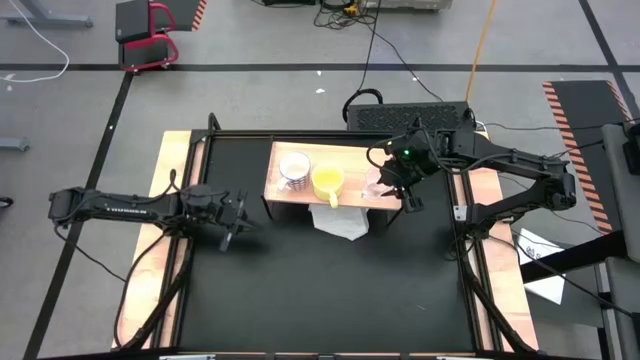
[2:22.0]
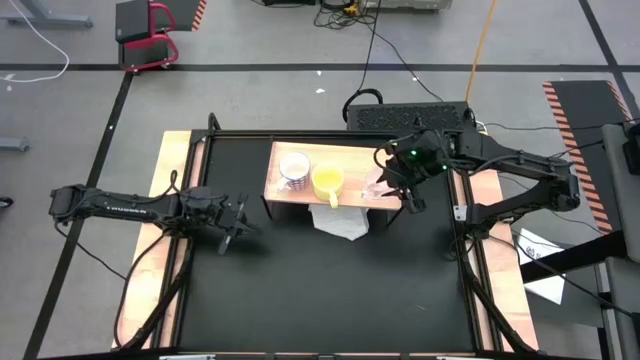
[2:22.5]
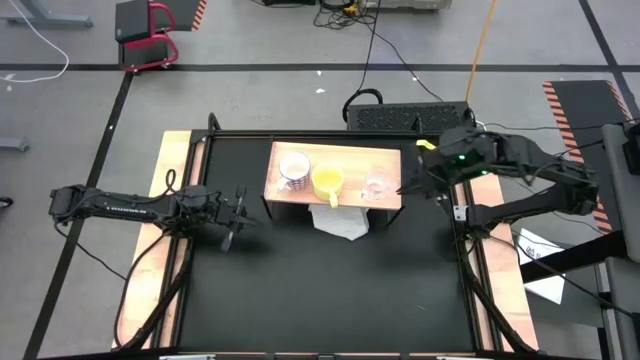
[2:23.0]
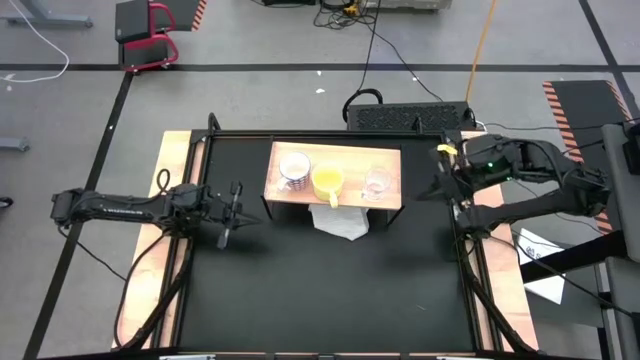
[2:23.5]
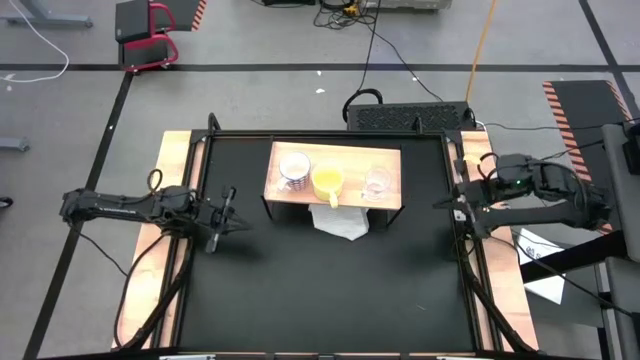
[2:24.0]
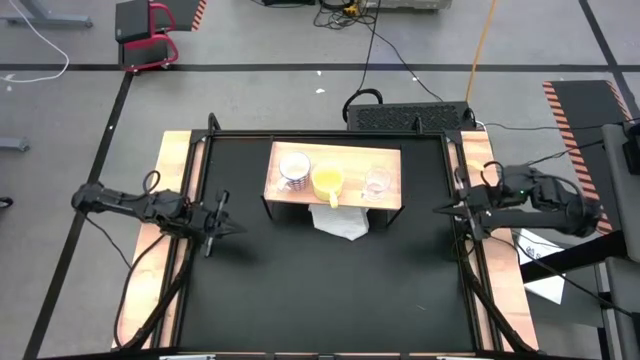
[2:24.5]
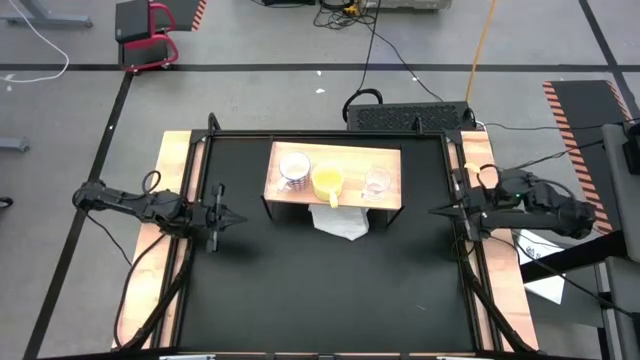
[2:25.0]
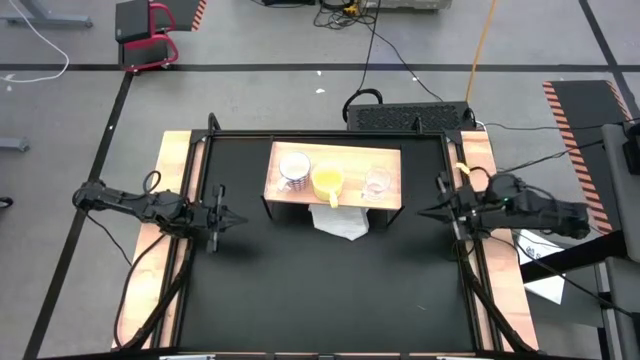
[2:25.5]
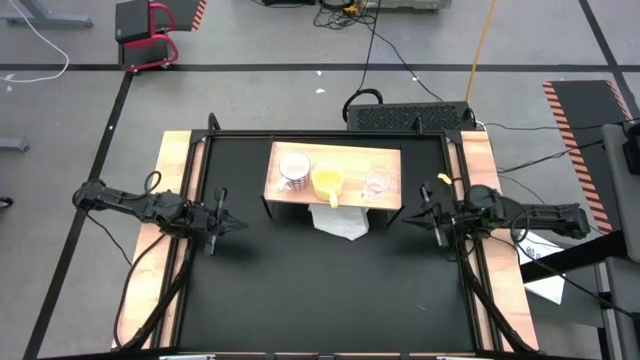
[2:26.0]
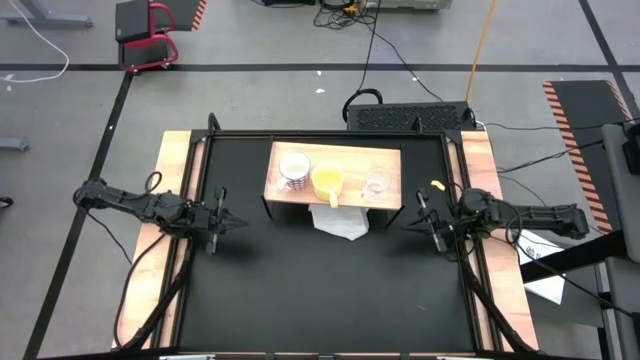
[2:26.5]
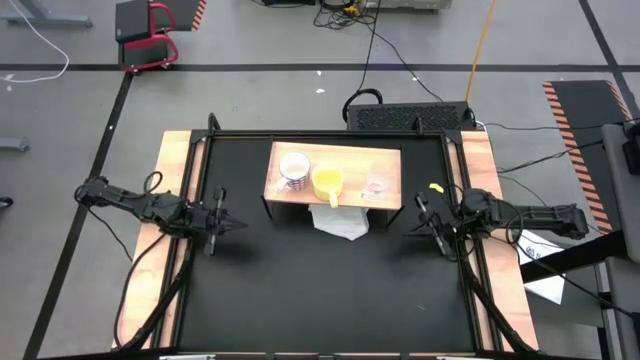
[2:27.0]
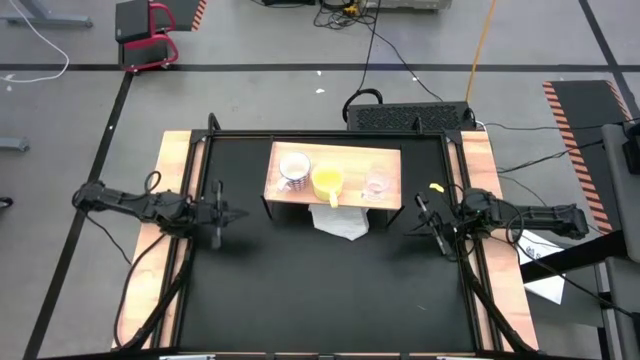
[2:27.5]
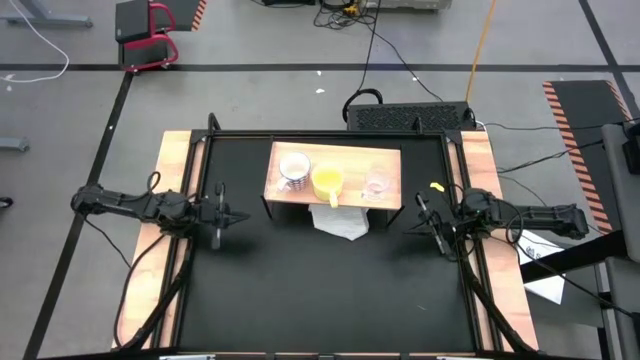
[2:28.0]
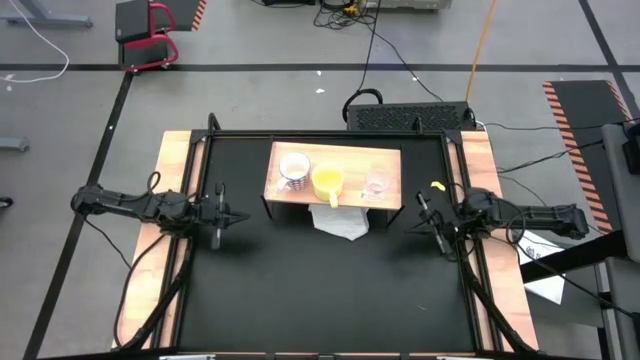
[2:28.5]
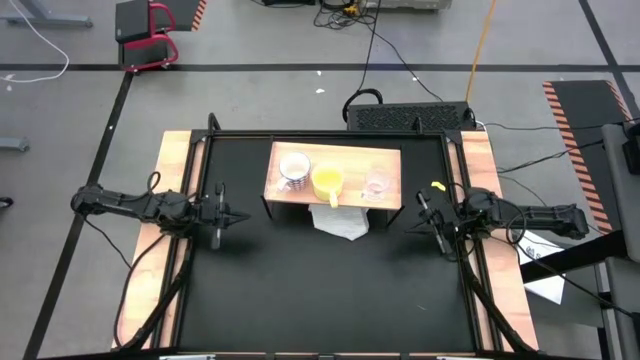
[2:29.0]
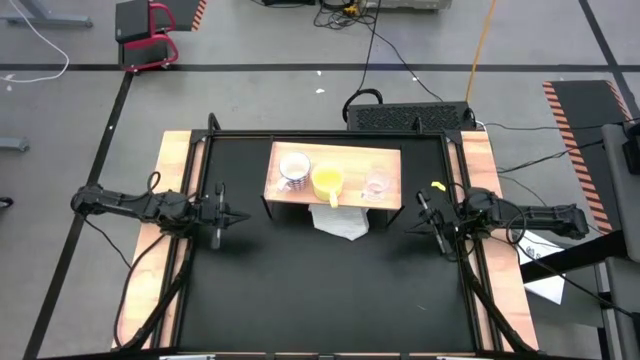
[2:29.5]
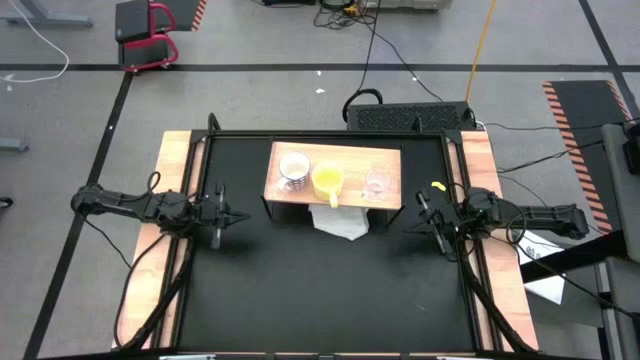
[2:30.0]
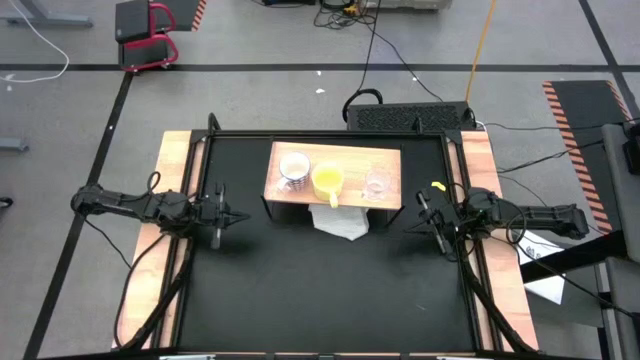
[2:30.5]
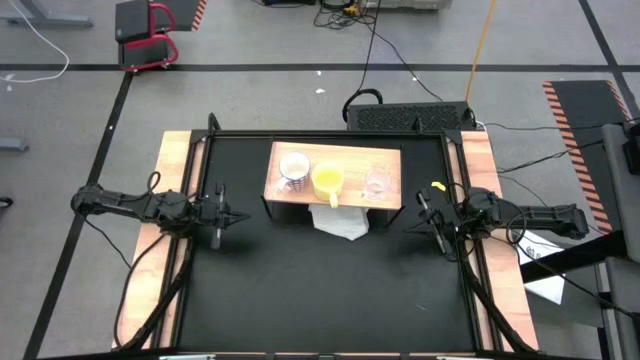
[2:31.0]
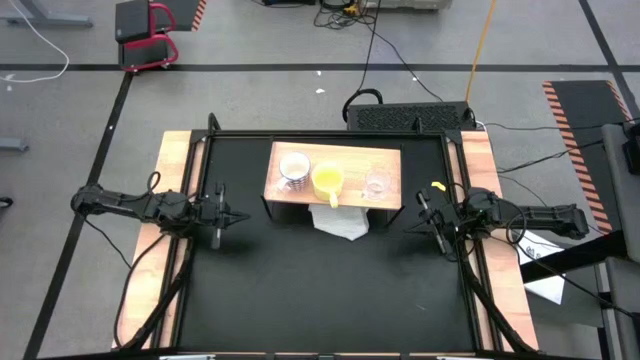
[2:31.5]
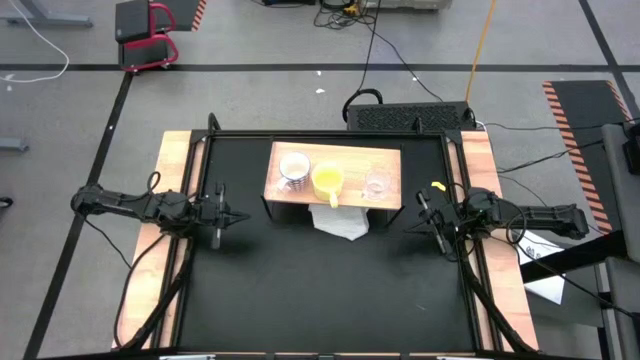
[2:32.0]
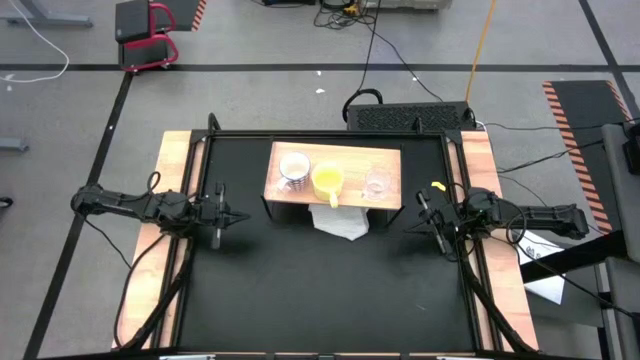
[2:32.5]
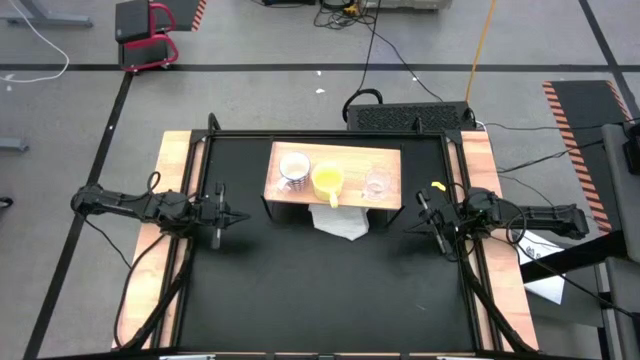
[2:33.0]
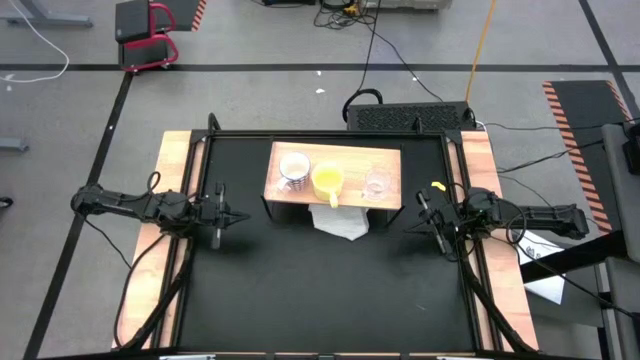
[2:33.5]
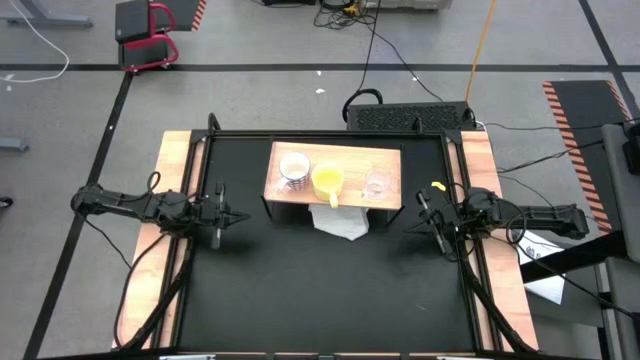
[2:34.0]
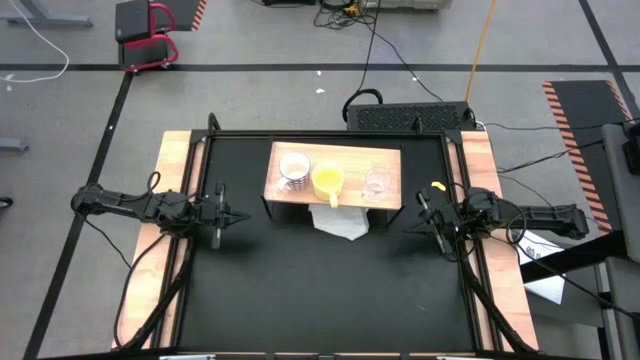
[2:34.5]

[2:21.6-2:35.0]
Task: Stack small to large cups/mugs on shelf
Return to Home Position

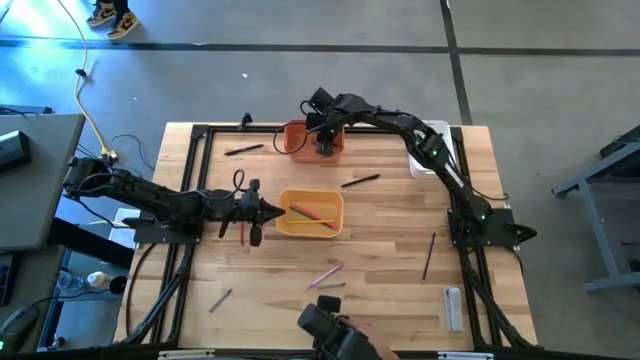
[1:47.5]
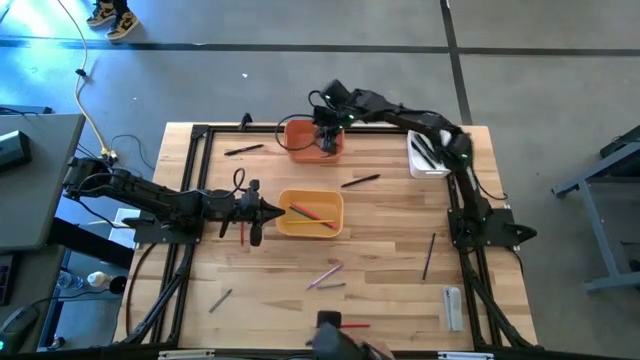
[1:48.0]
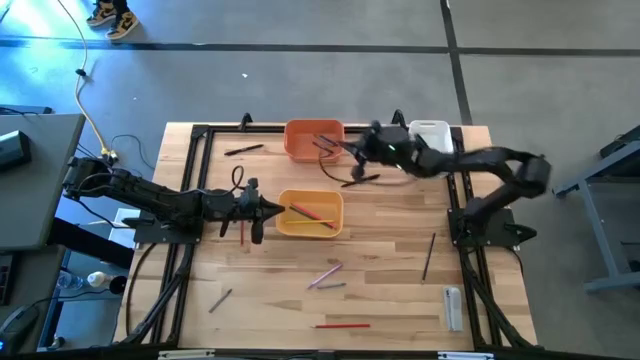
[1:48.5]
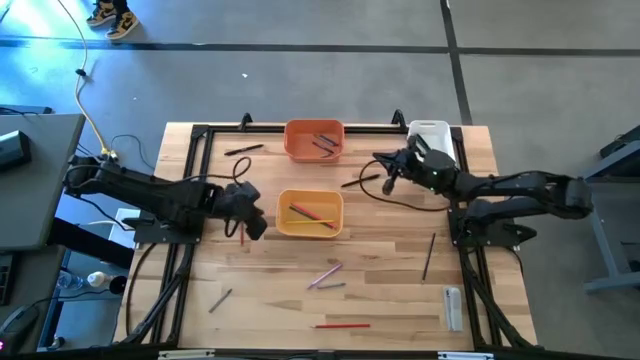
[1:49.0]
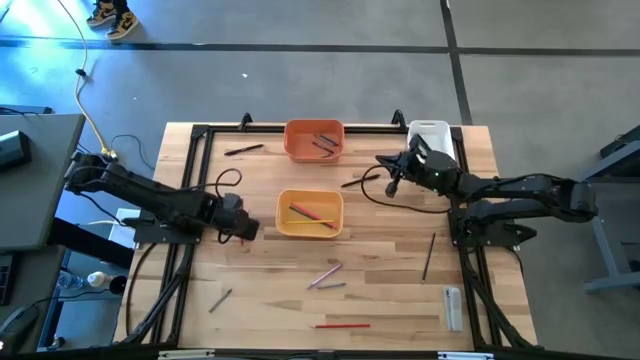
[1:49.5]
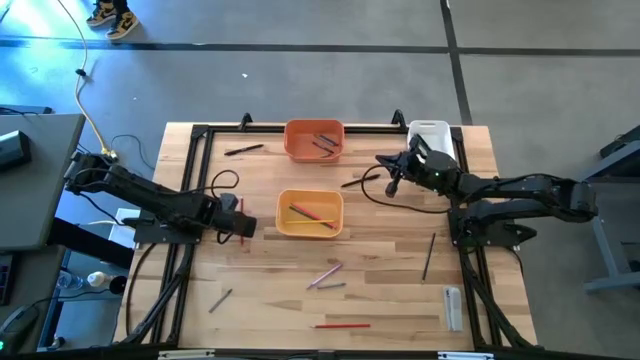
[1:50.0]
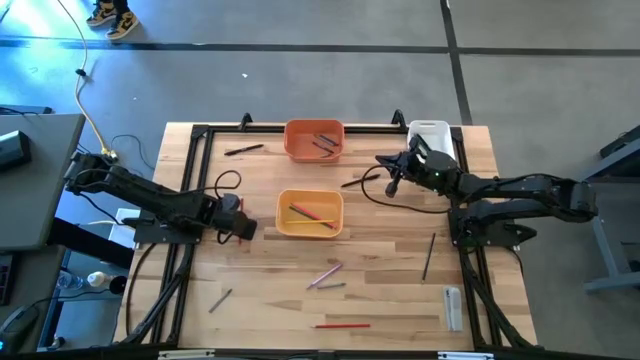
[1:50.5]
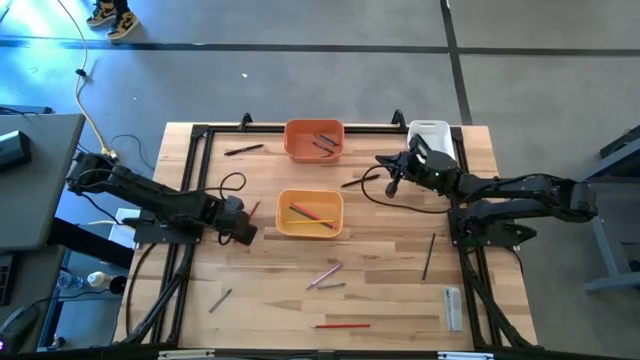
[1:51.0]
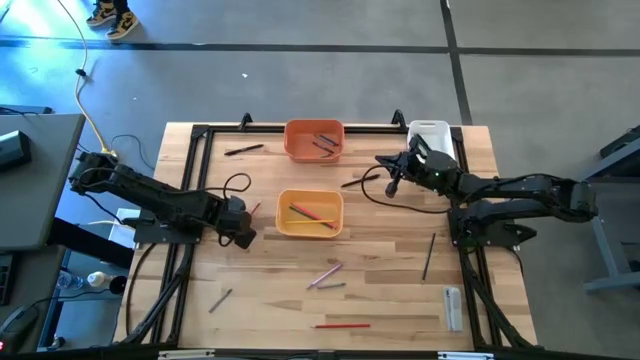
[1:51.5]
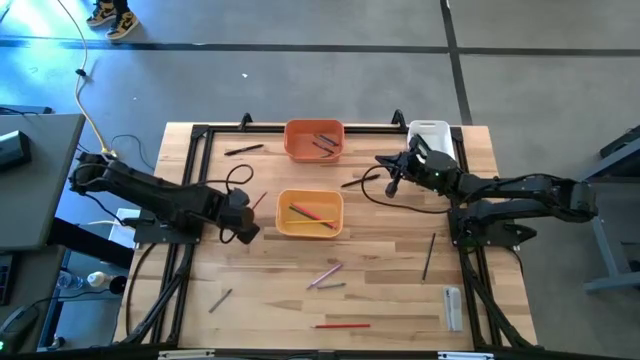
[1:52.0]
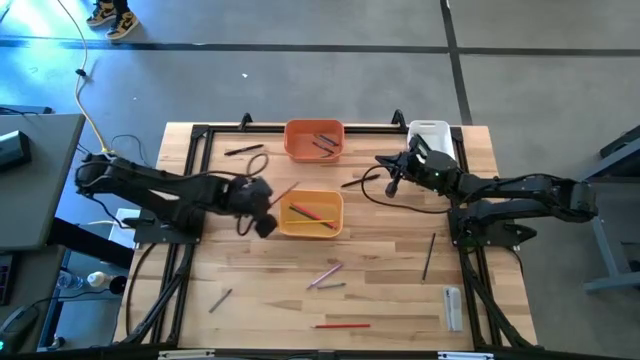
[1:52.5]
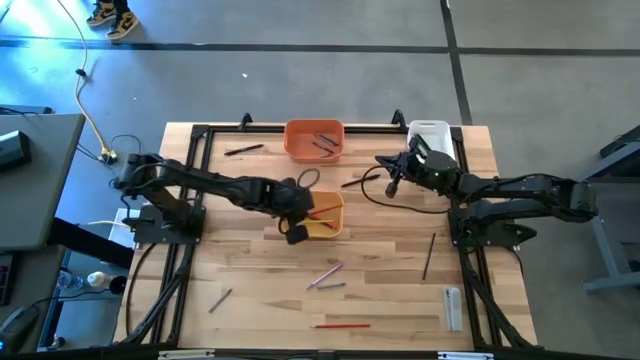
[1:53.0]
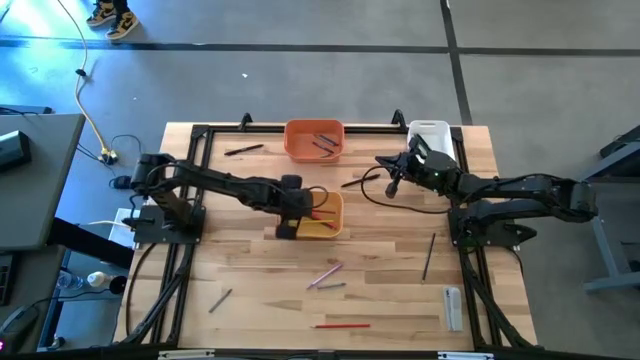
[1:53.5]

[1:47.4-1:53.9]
Task: Sort crayons/erasers/pens/pencils in bins
Put the top red pencil into the yellow bin

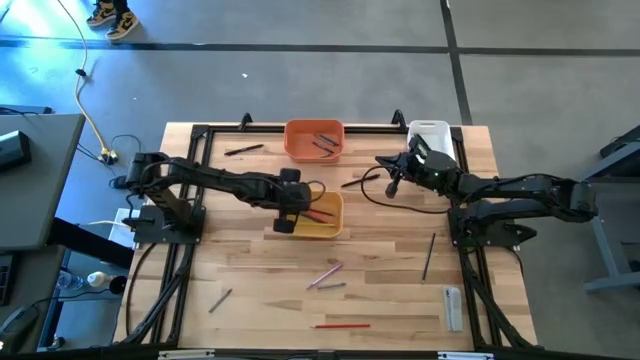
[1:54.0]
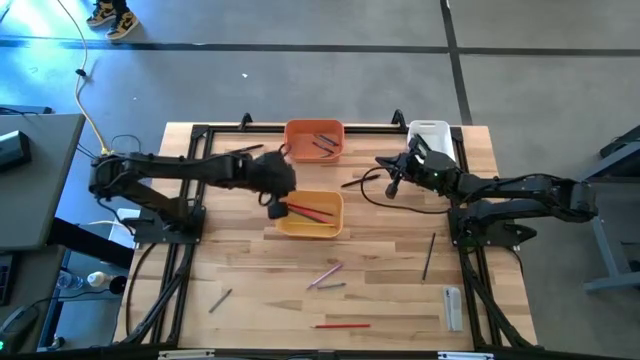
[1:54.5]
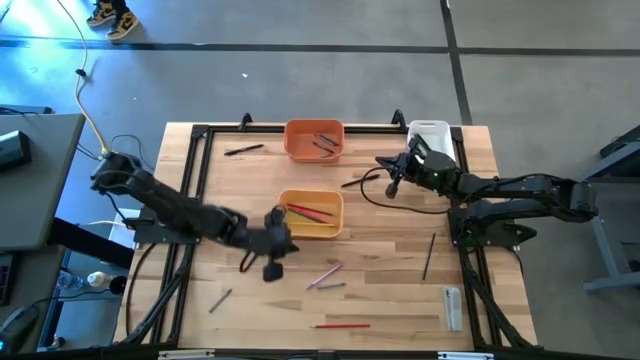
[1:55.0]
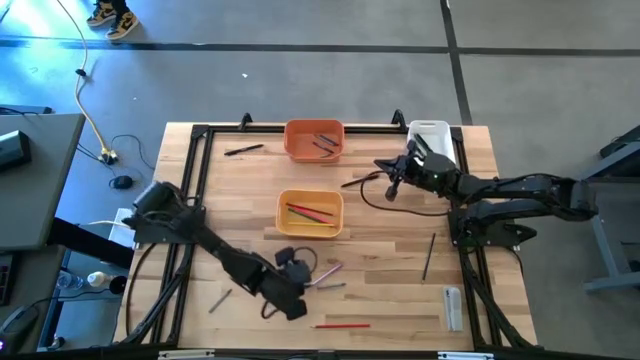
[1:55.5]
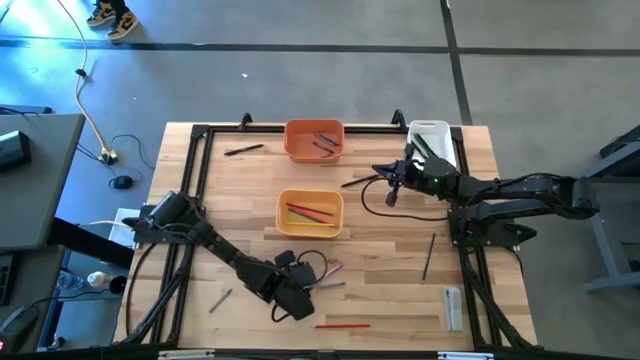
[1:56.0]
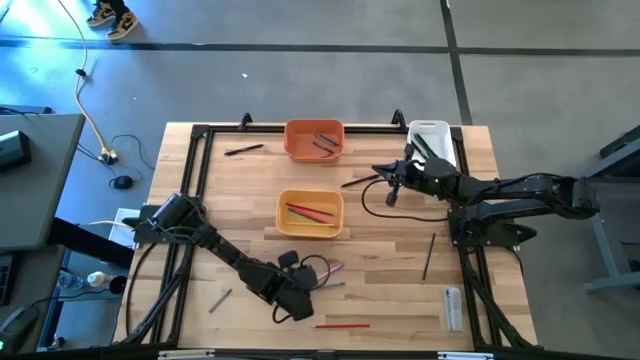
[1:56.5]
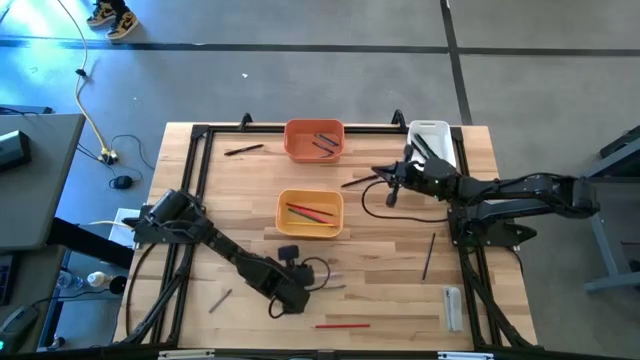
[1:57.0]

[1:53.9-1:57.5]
Put the purple pen into the white bin
